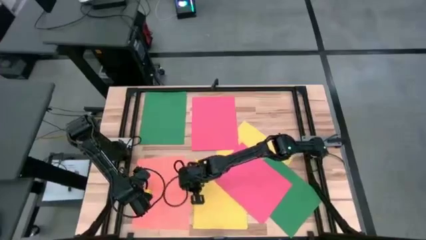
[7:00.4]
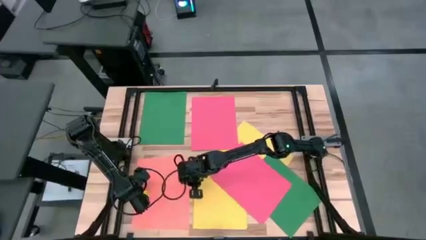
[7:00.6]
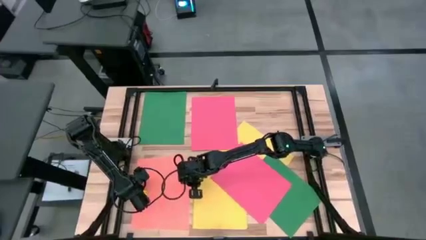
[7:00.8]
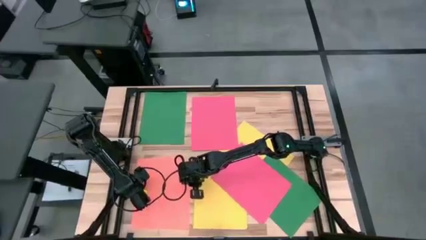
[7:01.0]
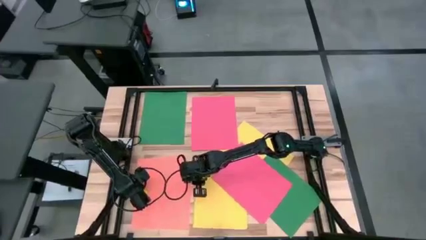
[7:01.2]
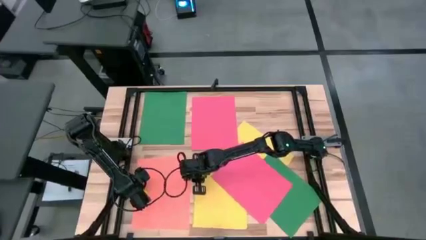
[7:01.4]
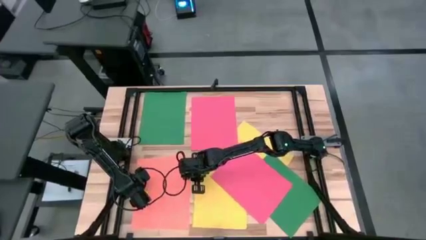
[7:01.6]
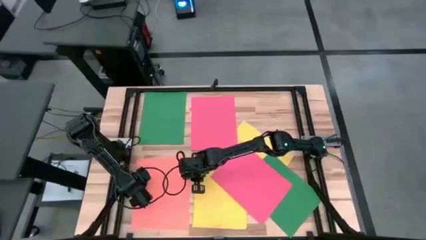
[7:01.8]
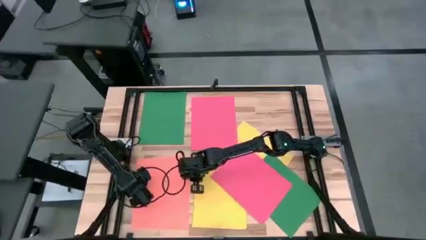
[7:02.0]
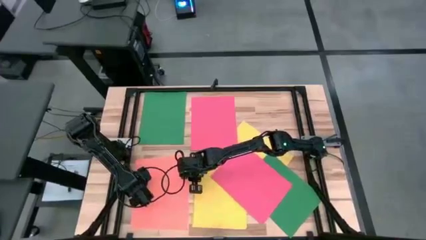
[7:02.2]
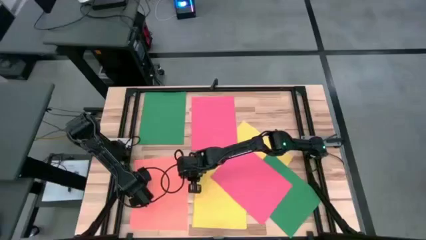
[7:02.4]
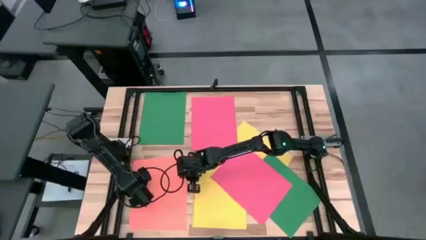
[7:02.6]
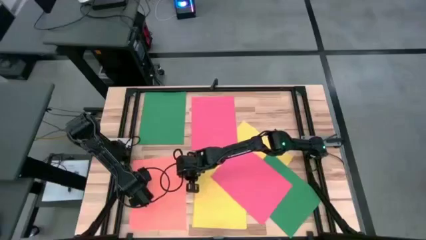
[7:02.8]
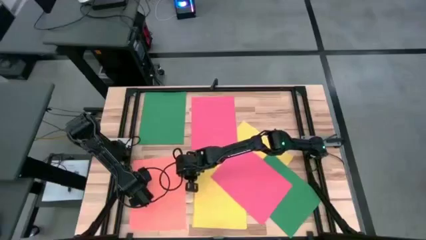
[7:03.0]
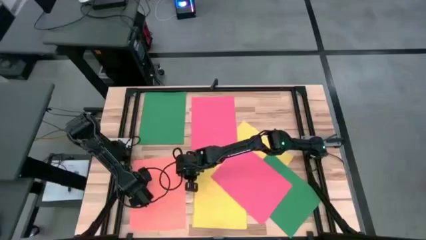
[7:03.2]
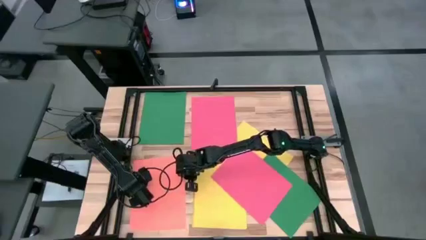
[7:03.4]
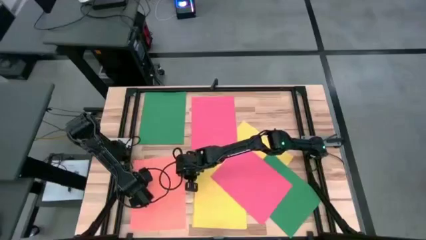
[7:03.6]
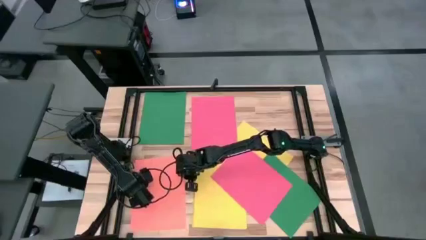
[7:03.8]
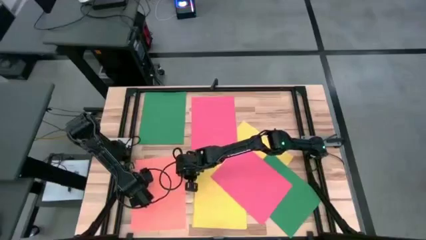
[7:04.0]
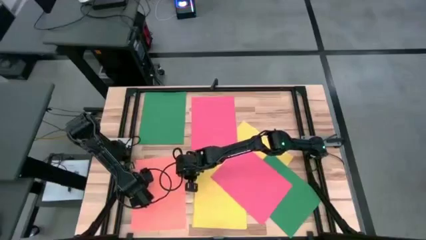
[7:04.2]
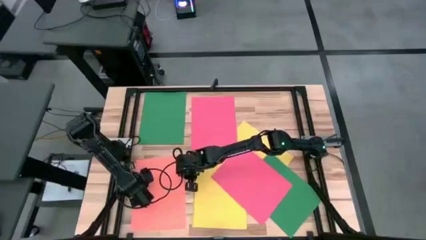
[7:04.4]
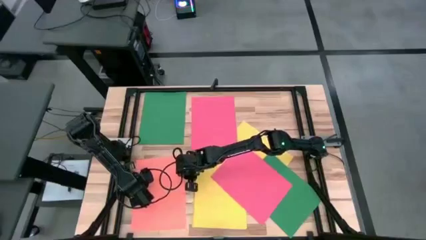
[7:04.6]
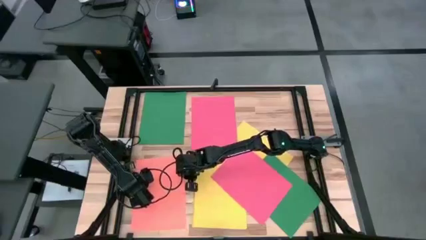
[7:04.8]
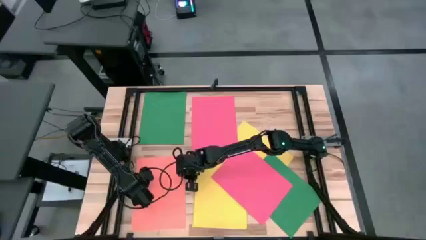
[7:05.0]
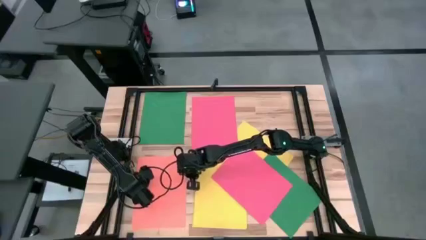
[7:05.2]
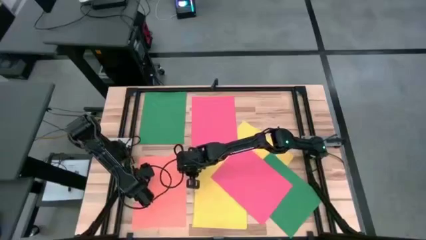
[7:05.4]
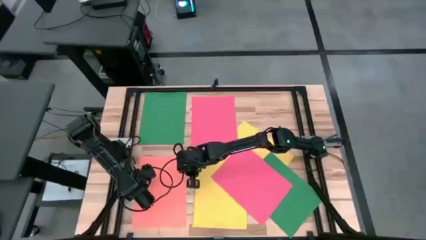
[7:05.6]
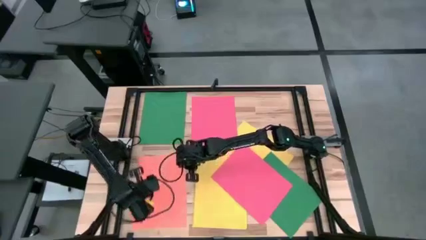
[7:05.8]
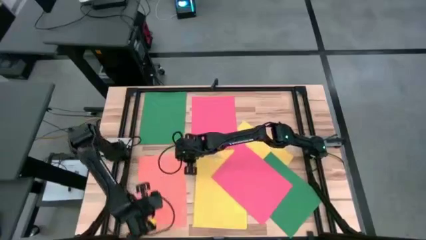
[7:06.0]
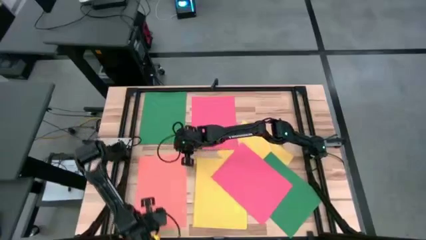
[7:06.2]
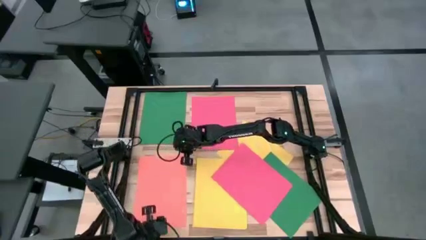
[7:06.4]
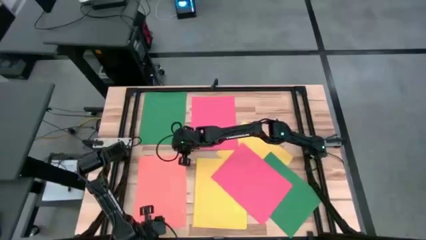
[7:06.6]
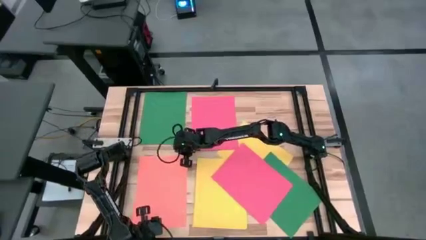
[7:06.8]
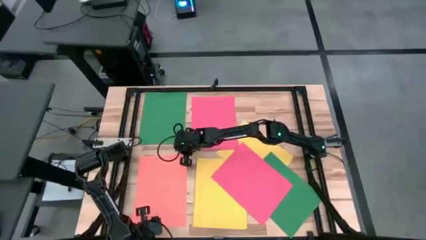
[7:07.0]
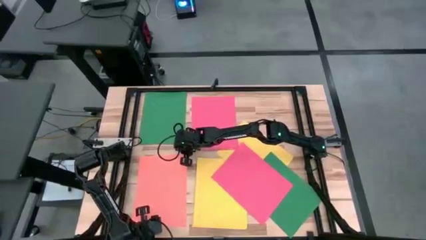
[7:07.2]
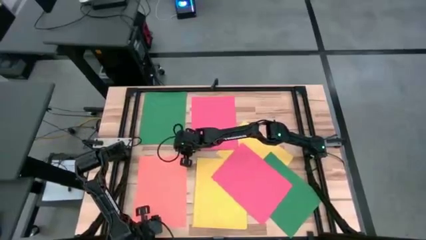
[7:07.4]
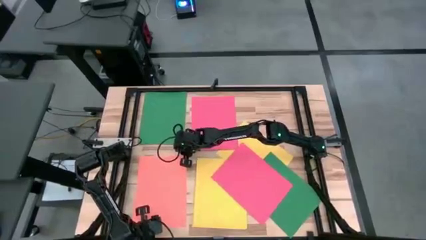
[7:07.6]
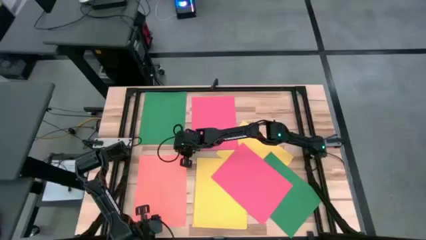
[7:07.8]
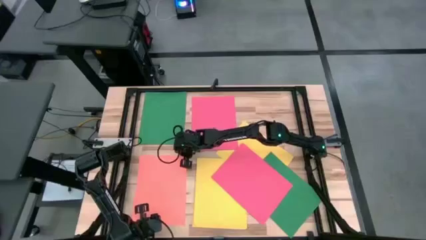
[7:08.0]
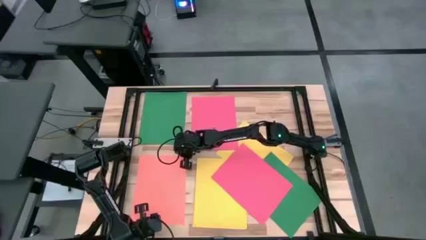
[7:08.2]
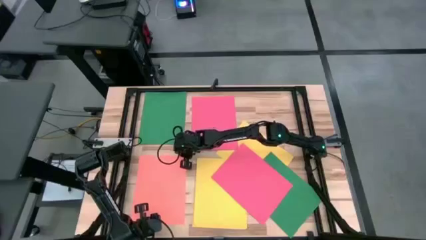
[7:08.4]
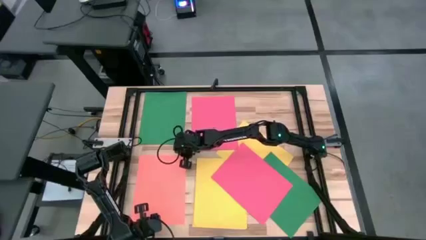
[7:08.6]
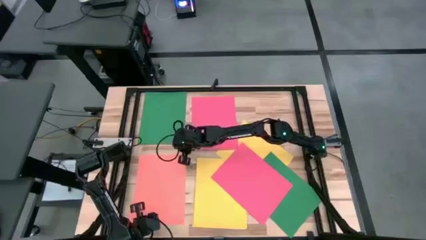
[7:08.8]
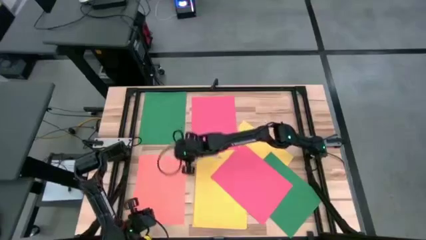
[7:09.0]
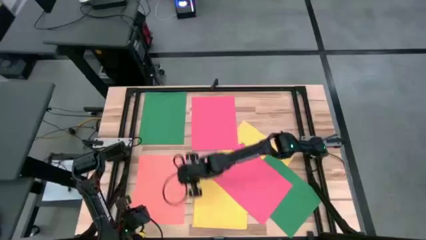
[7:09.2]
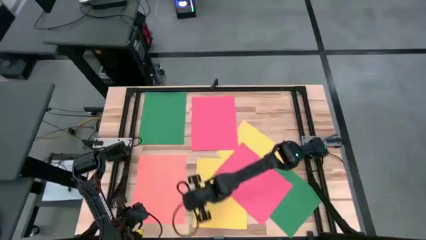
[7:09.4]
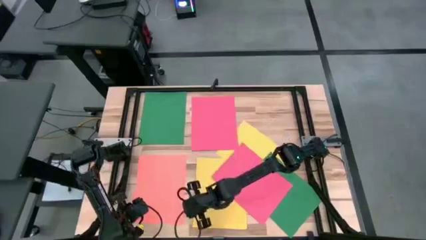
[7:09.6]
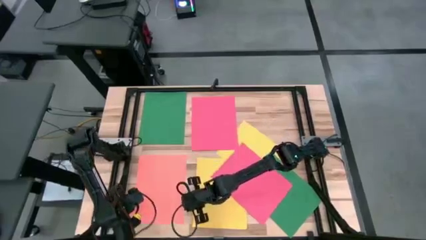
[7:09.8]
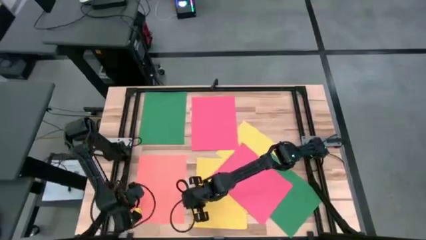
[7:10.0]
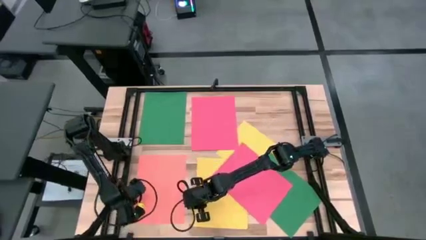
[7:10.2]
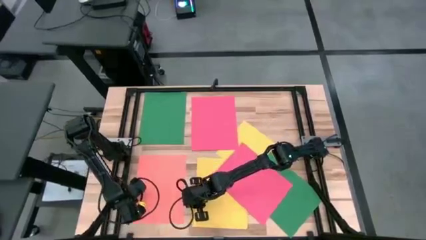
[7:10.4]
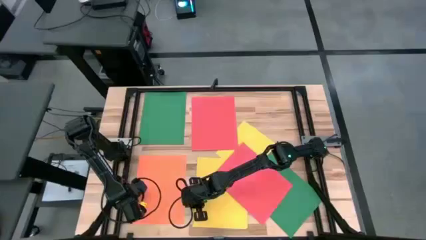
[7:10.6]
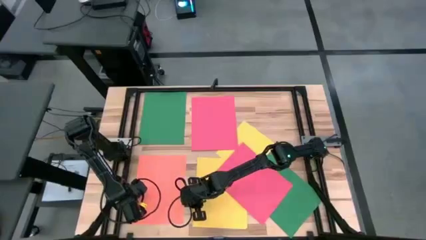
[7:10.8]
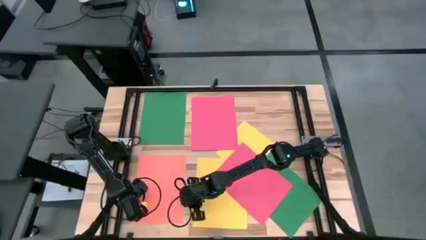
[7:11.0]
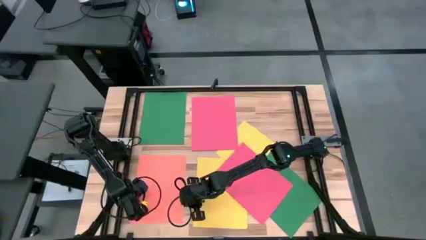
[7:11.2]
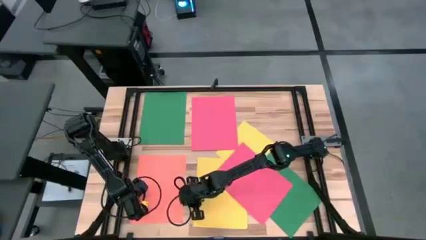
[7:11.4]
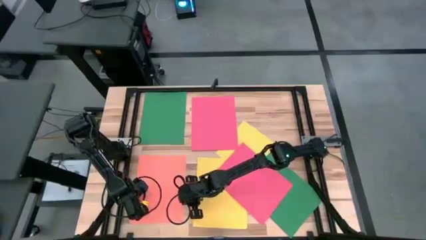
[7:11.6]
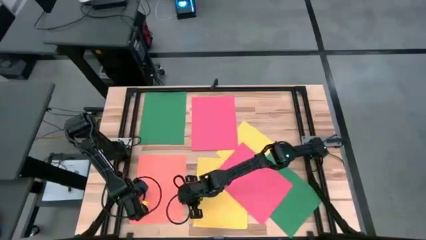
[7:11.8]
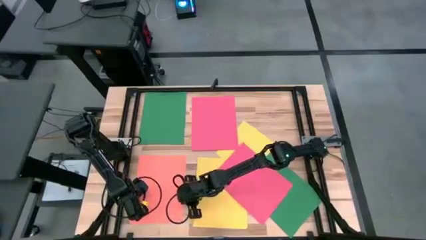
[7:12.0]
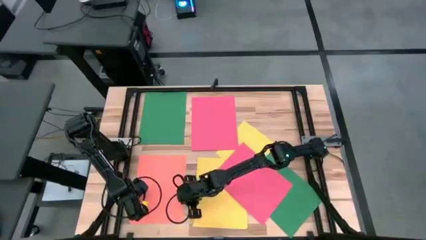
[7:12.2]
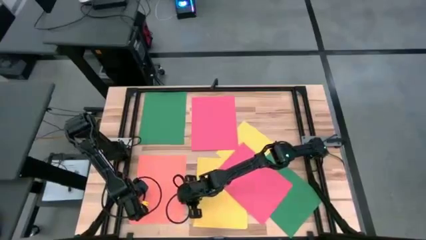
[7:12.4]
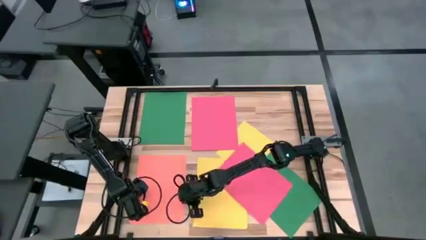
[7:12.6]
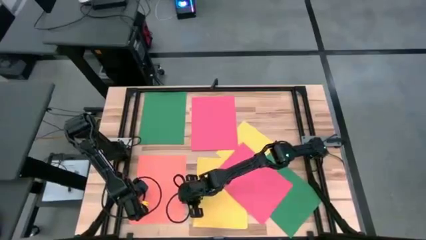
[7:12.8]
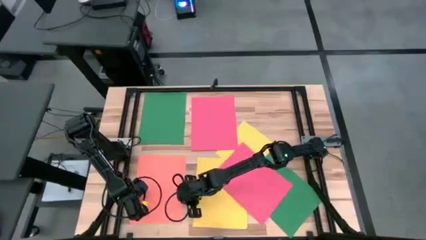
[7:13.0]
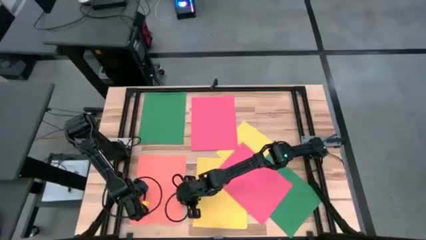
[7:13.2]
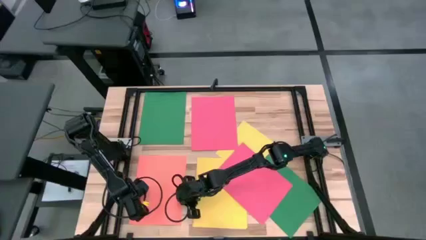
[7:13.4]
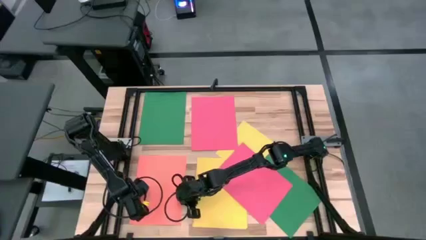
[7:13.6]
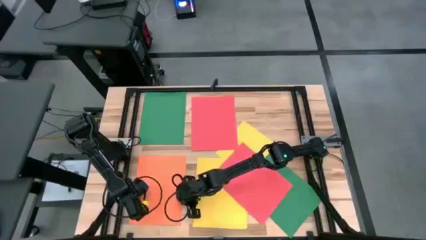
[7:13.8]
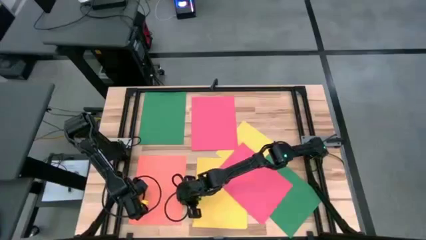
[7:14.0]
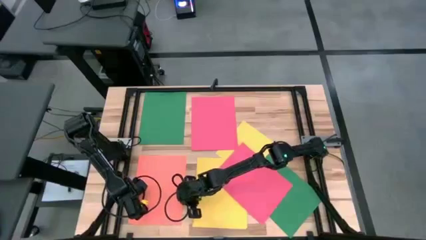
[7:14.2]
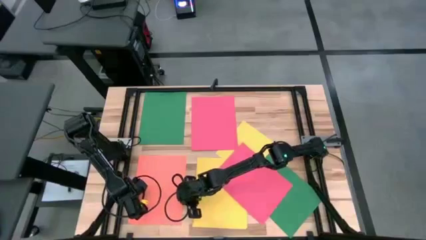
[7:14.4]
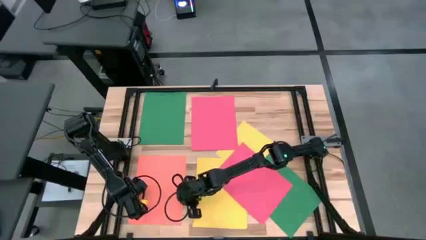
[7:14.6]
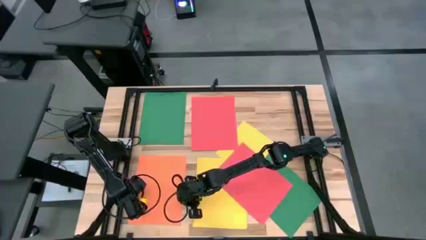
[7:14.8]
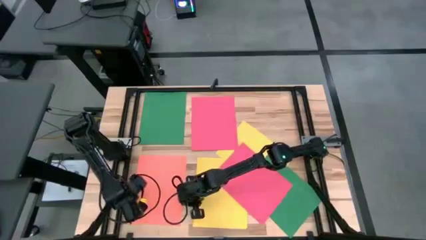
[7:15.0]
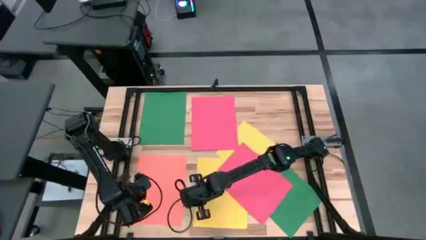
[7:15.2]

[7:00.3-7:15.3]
Task: Organize paper
Stack the orange paper on top of the orange paper
